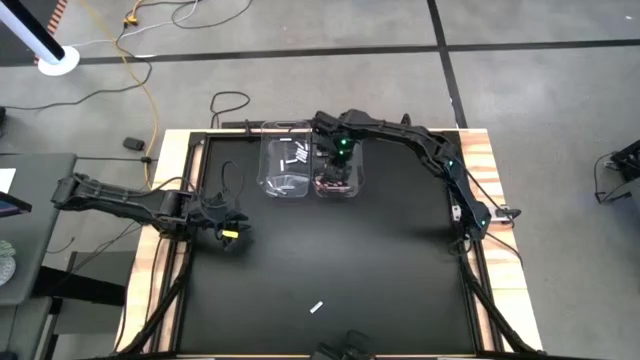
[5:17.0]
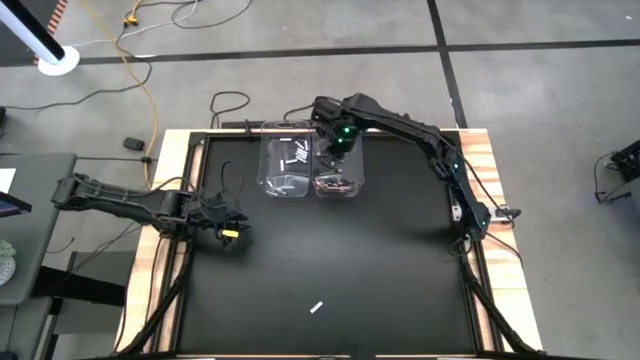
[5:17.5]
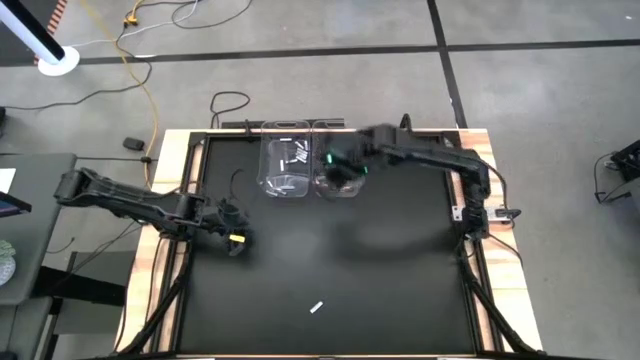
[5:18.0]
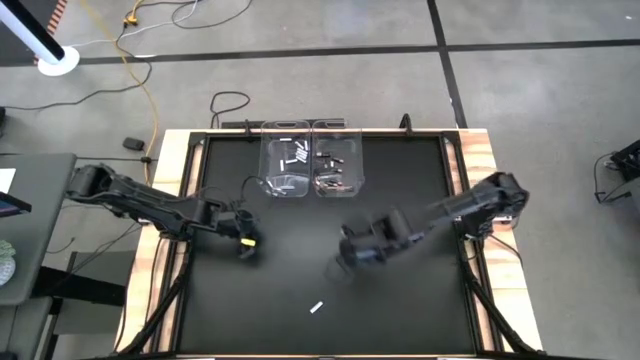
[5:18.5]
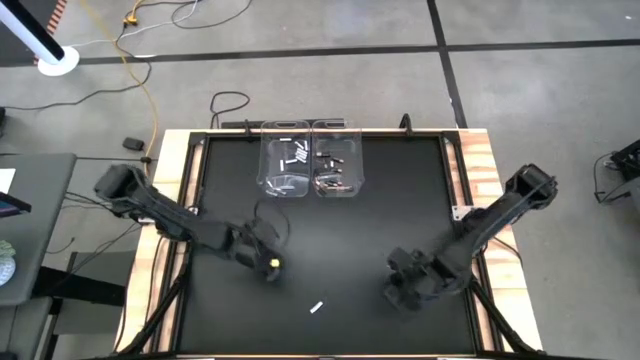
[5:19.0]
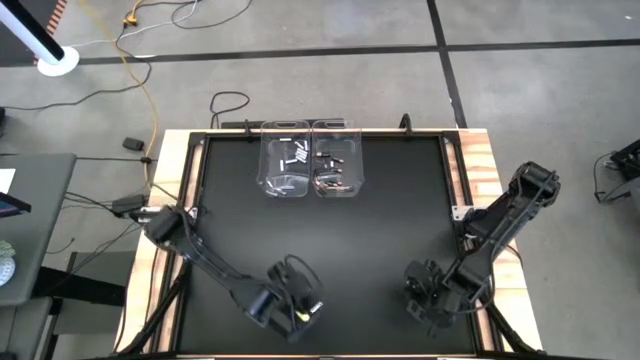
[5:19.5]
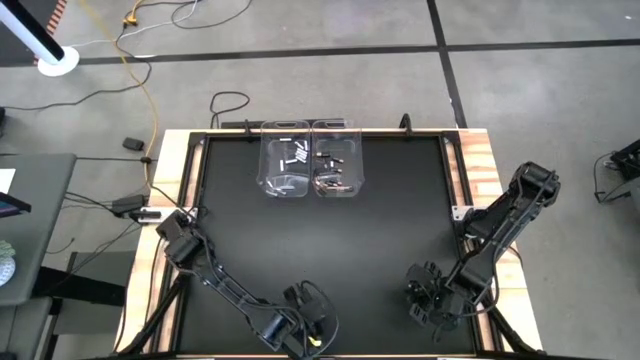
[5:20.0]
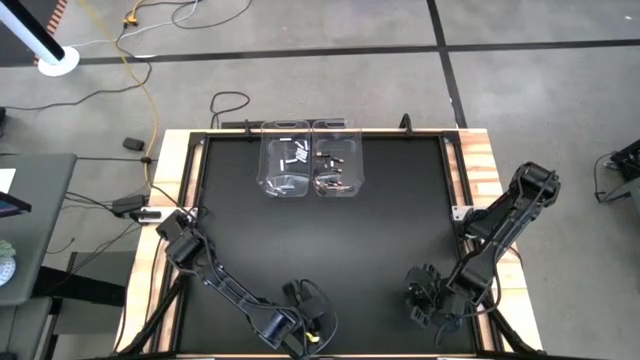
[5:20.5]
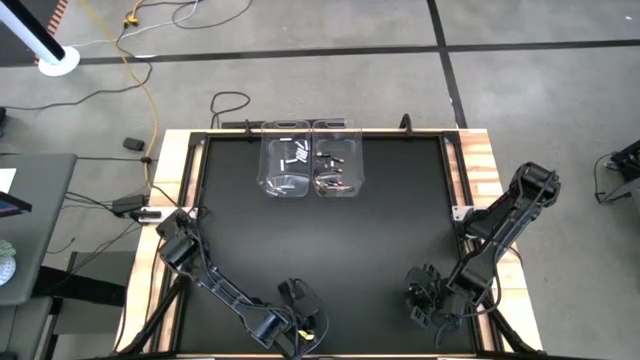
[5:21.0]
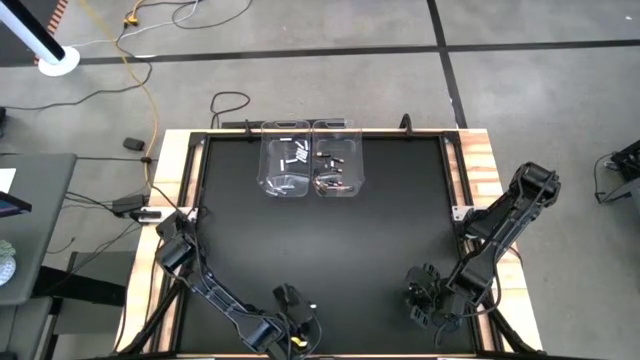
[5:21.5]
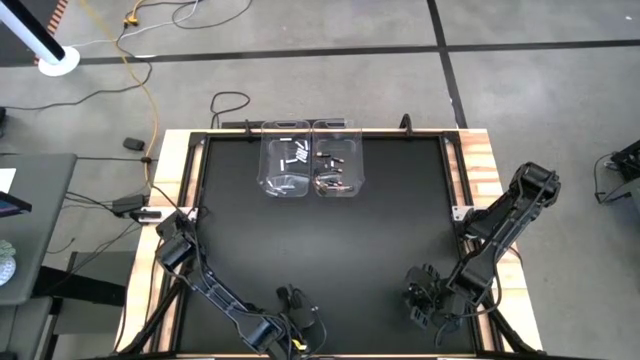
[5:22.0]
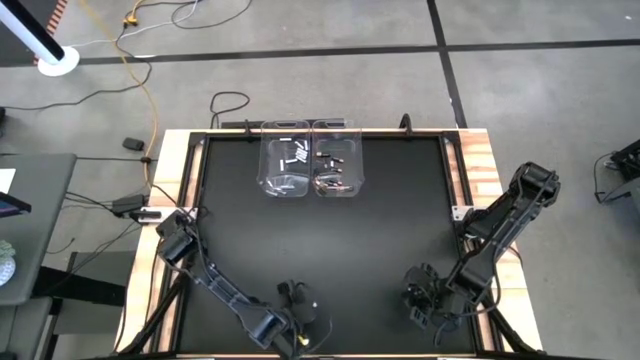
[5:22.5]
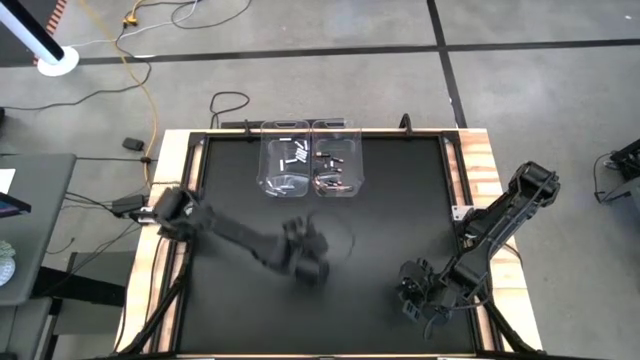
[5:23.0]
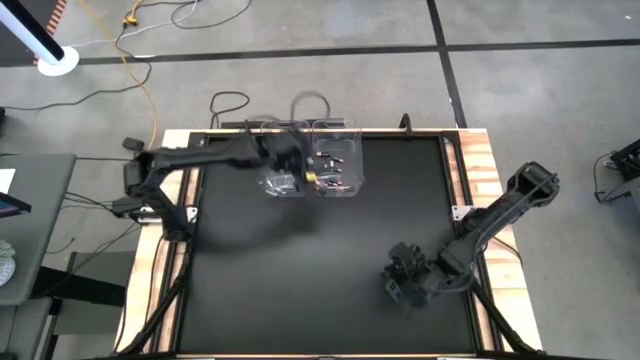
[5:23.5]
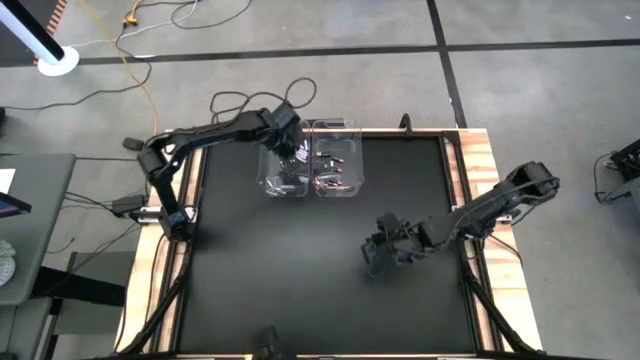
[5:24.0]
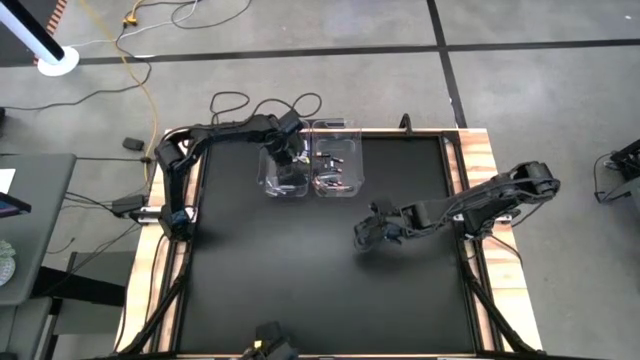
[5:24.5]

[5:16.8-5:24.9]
Task: Sort batteries
Put the white battery into the left transparent bin

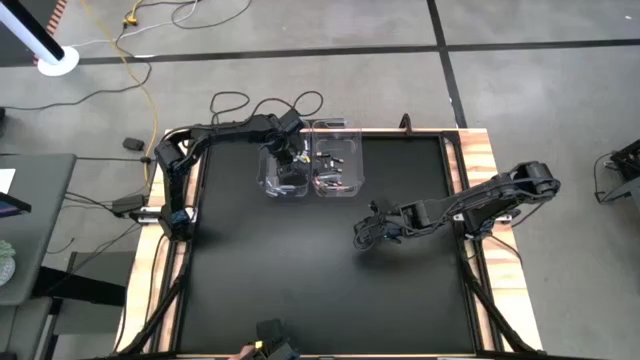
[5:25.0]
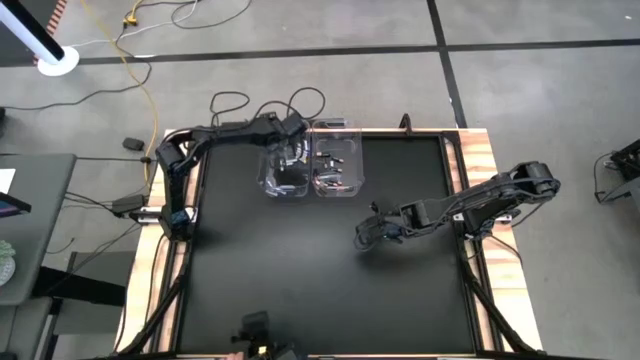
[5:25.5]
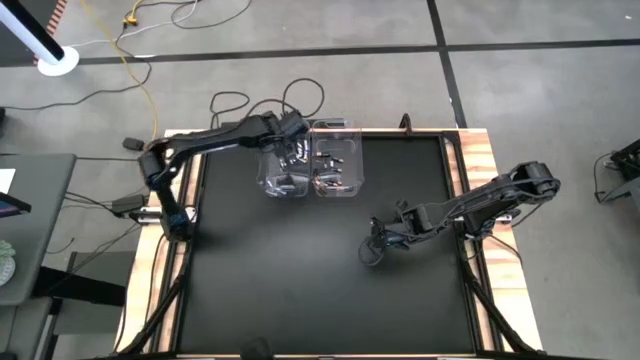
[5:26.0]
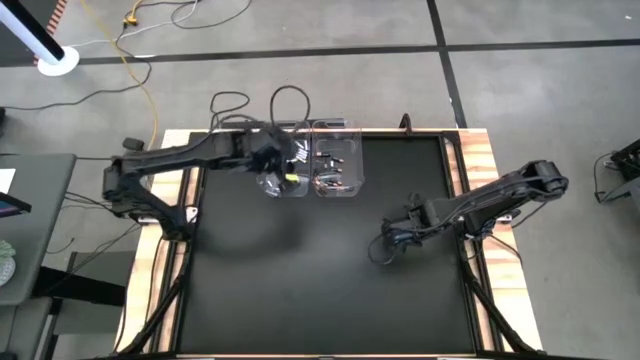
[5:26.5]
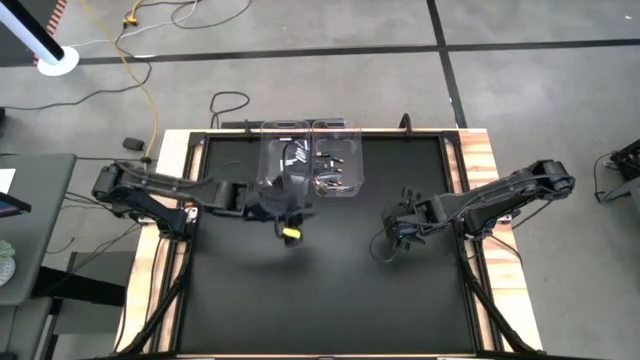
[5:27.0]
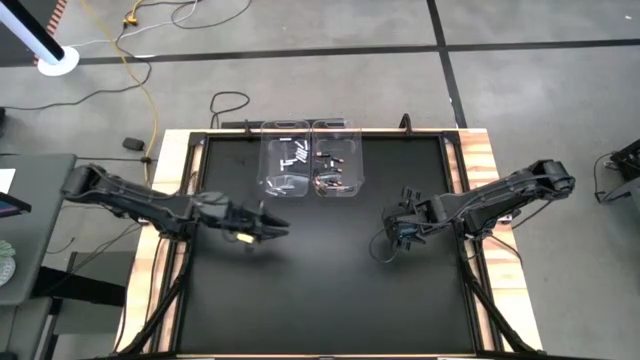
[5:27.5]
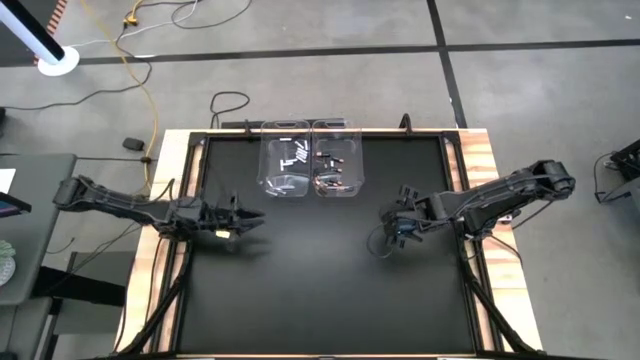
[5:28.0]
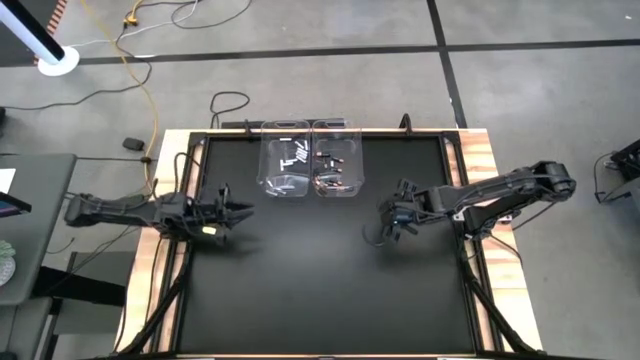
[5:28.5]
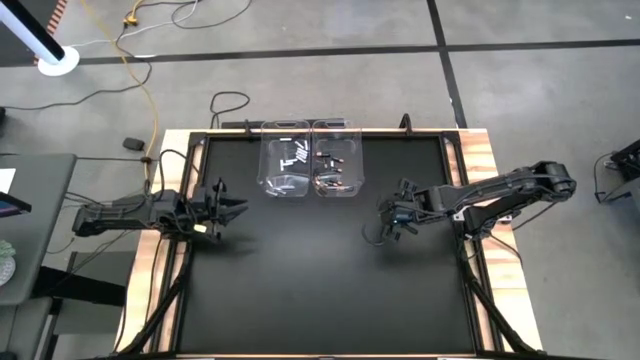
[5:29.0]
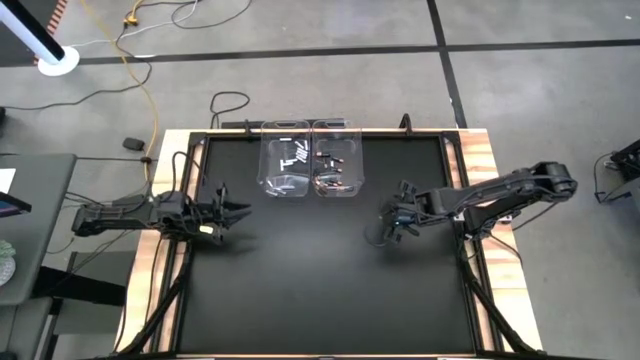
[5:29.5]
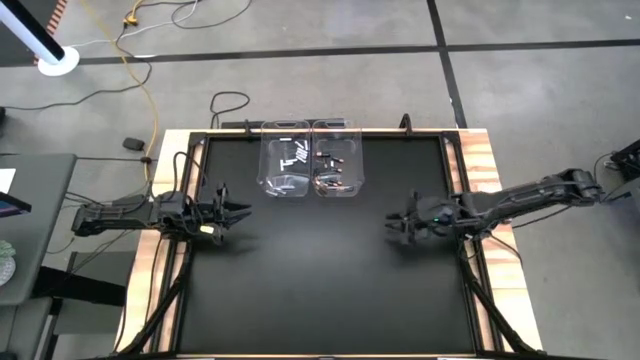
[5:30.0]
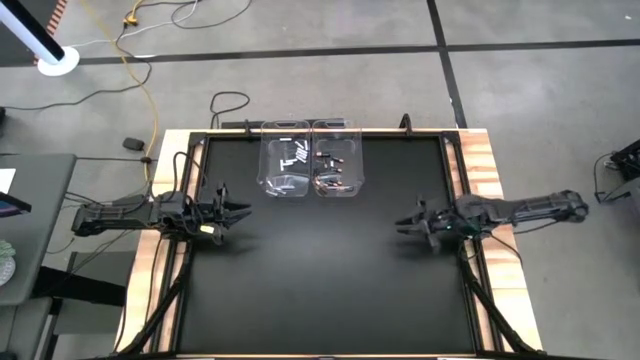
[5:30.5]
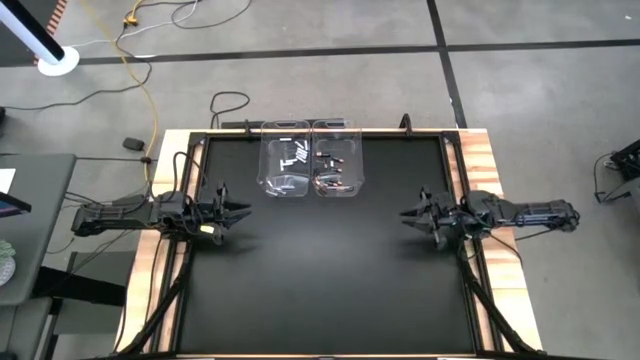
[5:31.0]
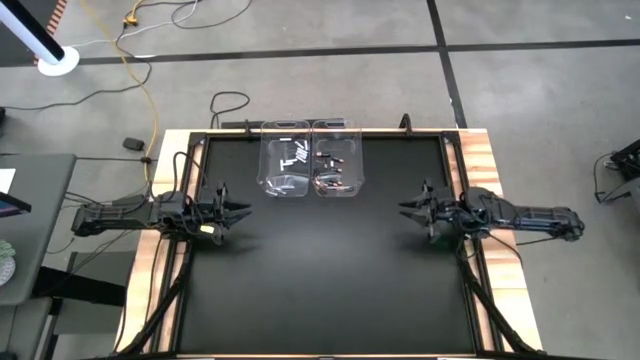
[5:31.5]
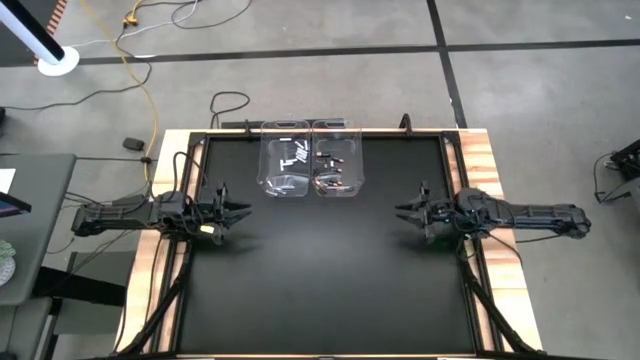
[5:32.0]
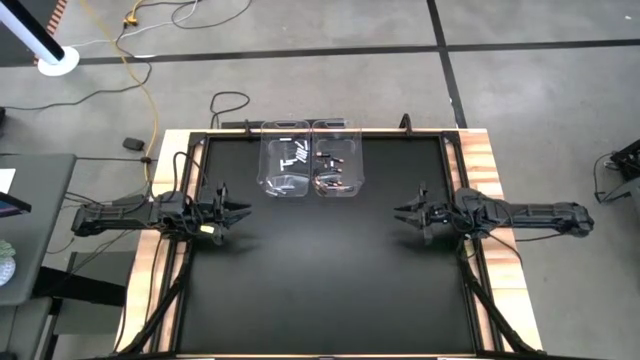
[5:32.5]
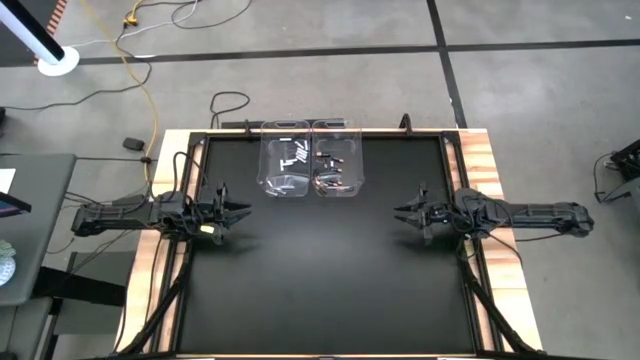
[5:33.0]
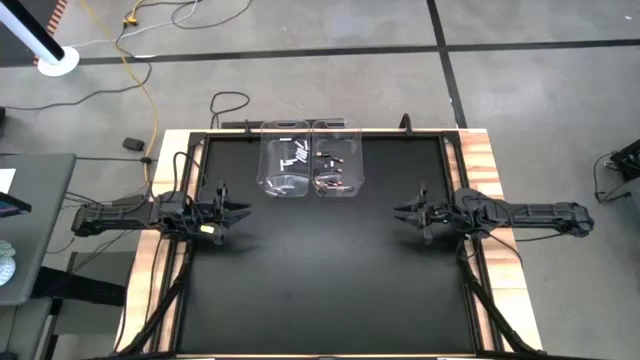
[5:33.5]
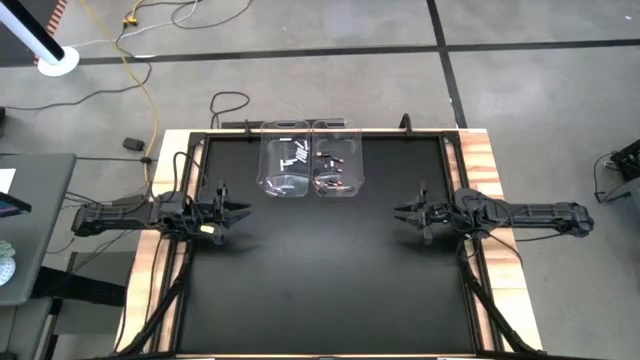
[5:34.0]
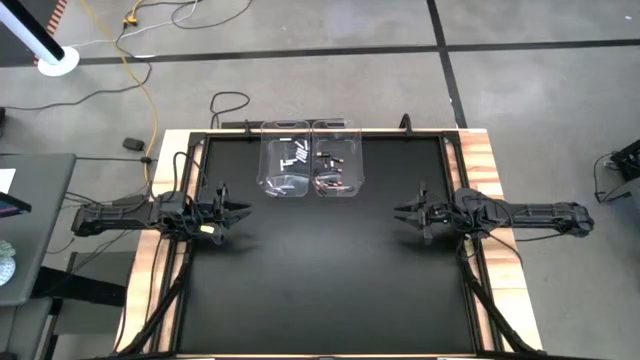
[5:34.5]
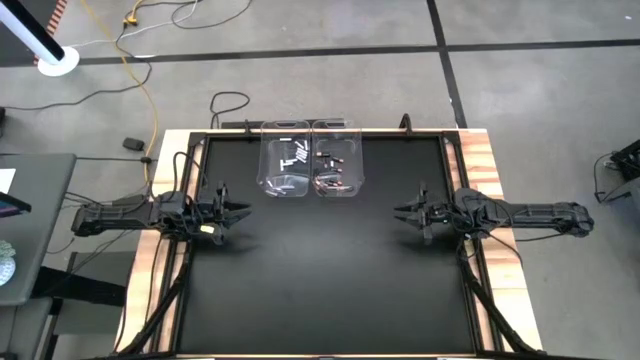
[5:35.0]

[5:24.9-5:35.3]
Return to Home Position

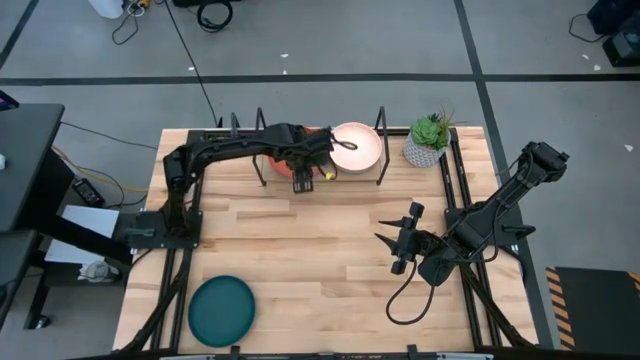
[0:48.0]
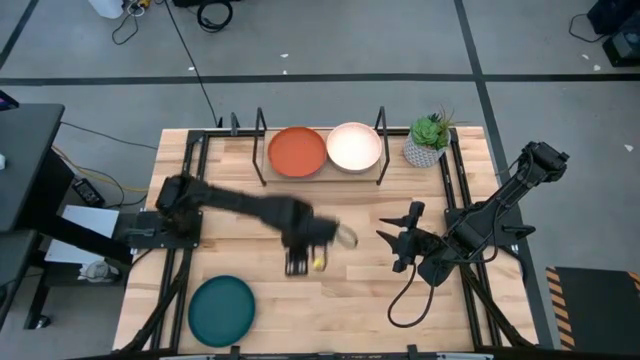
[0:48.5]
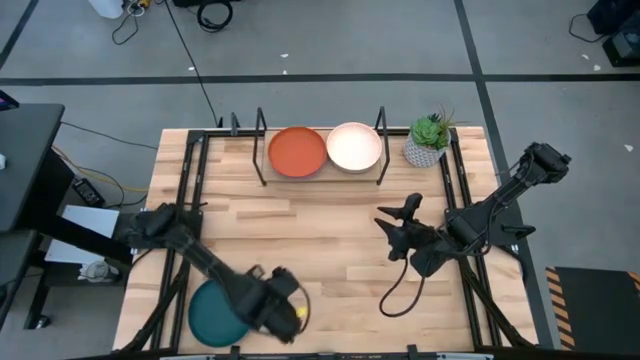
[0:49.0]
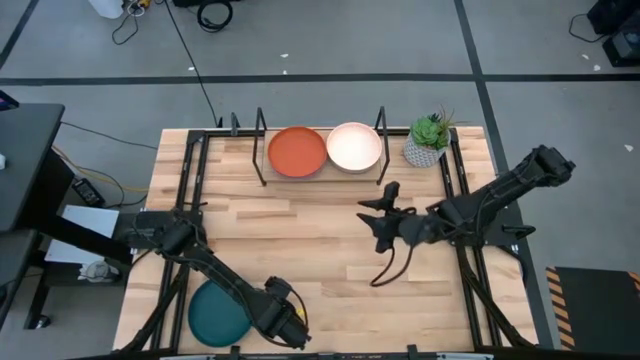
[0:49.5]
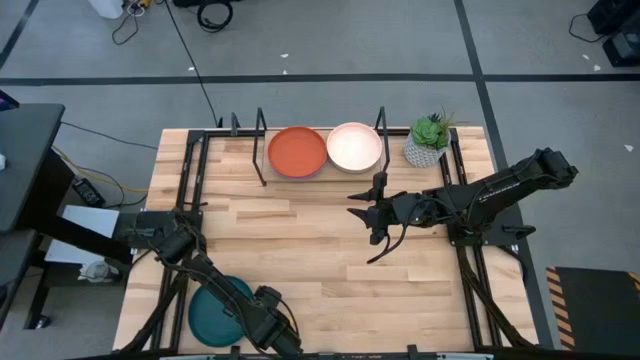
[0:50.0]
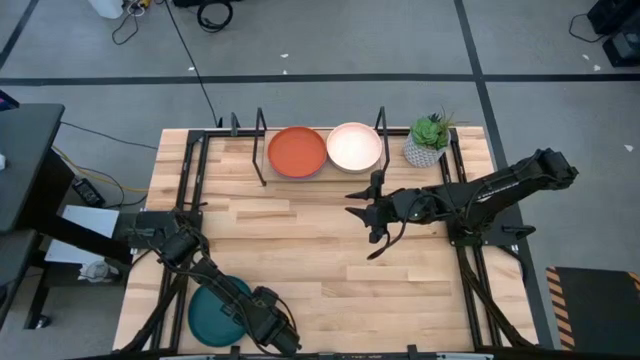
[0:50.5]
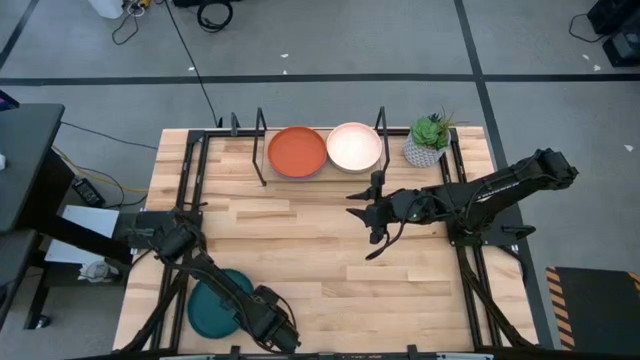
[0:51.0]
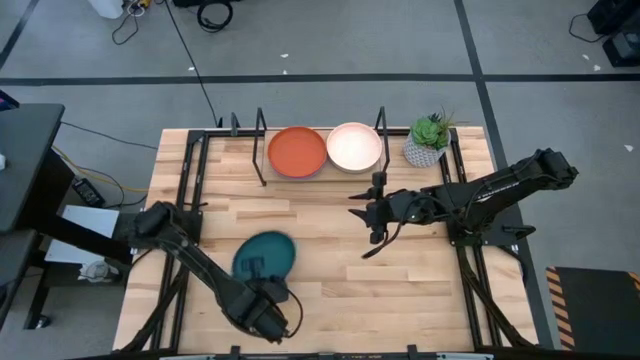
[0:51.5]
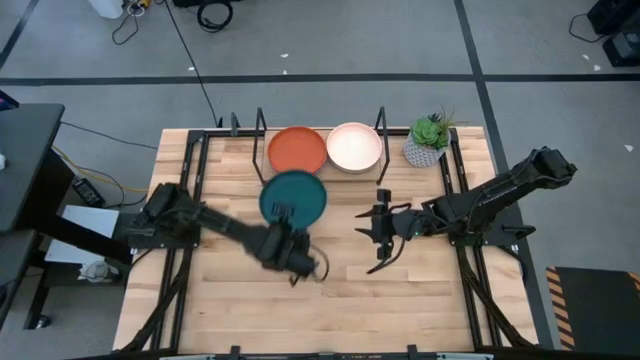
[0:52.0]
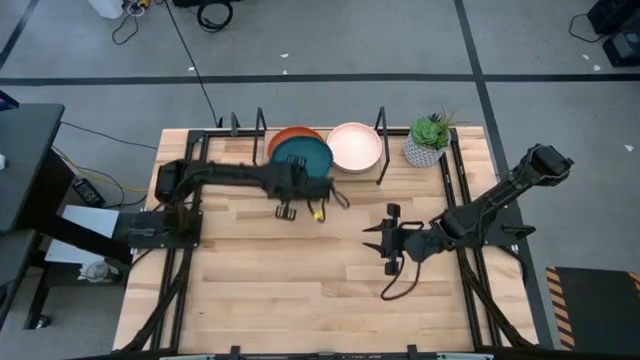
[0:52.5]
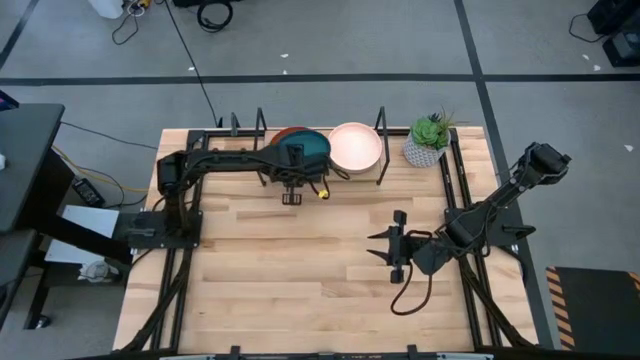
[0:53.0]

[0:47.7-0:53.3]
Task: Place and stack plates onto a shelf
Stack the dark blue plate on top of the orange plate on the shelf
